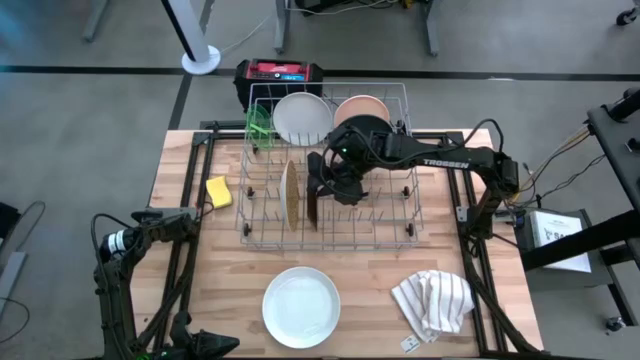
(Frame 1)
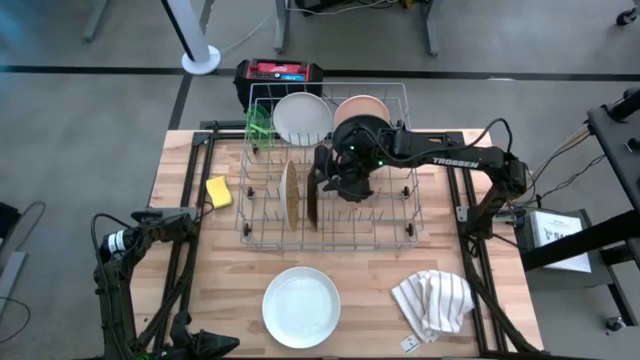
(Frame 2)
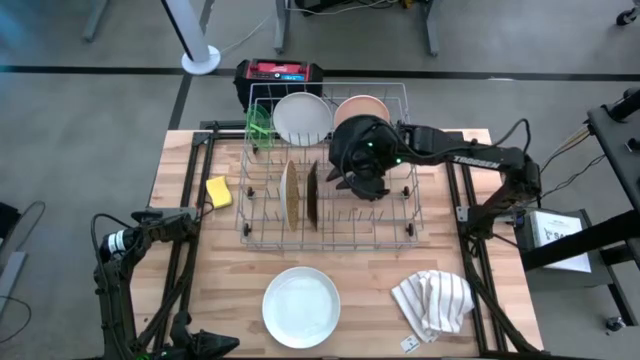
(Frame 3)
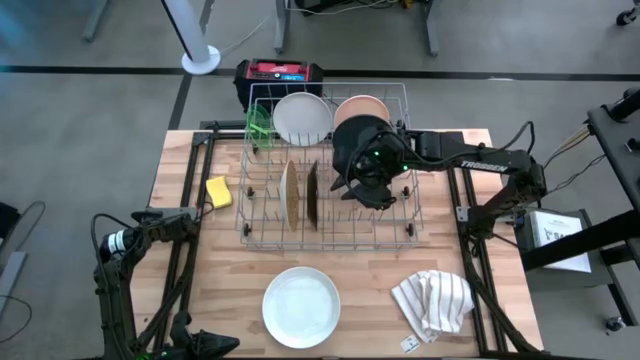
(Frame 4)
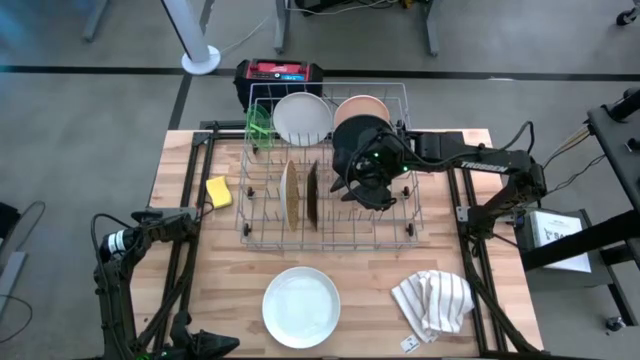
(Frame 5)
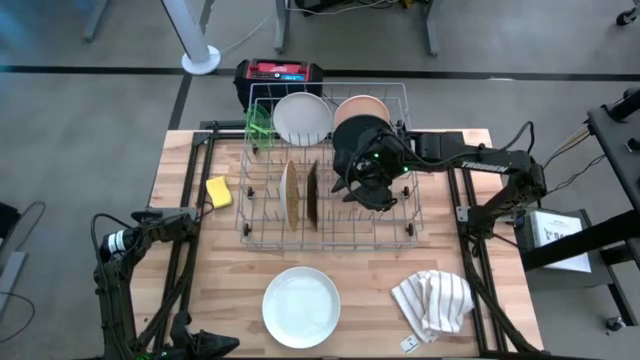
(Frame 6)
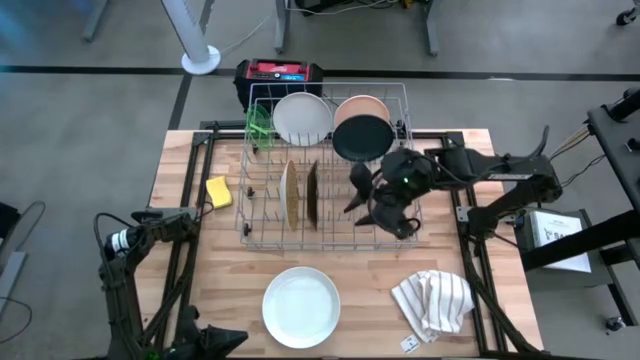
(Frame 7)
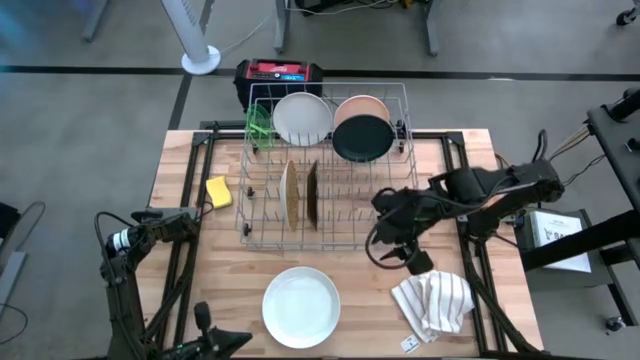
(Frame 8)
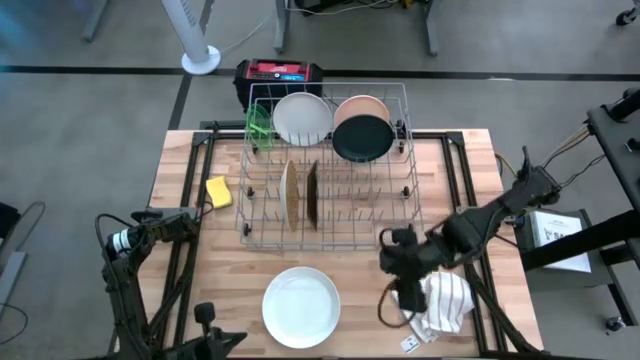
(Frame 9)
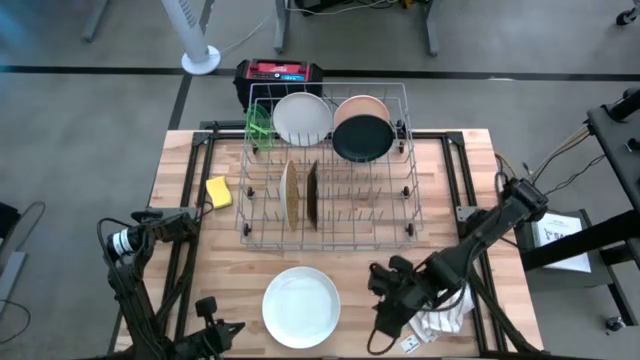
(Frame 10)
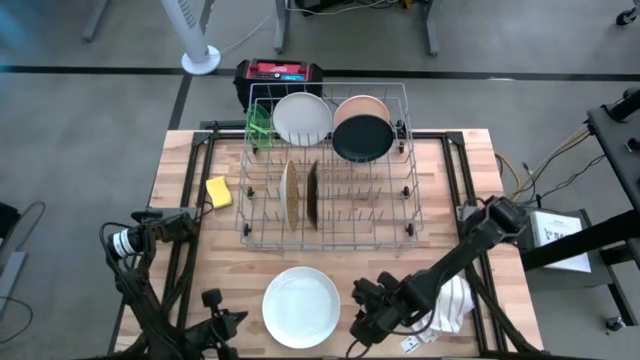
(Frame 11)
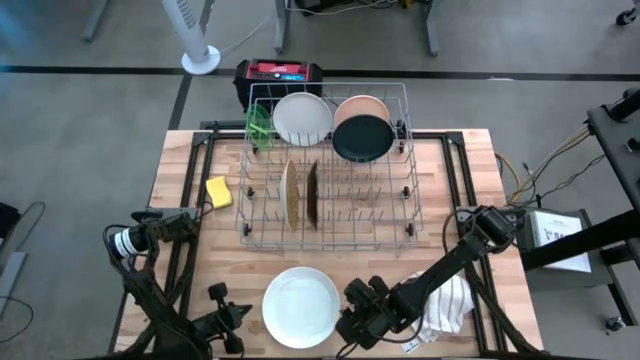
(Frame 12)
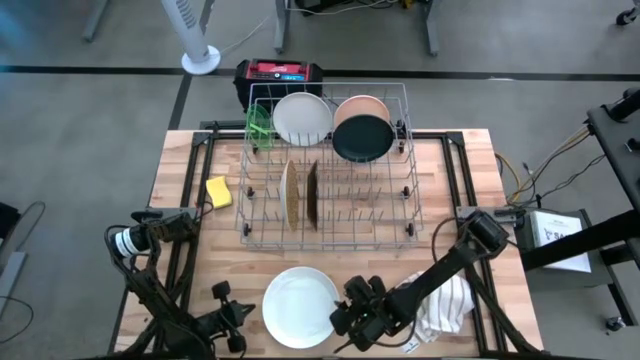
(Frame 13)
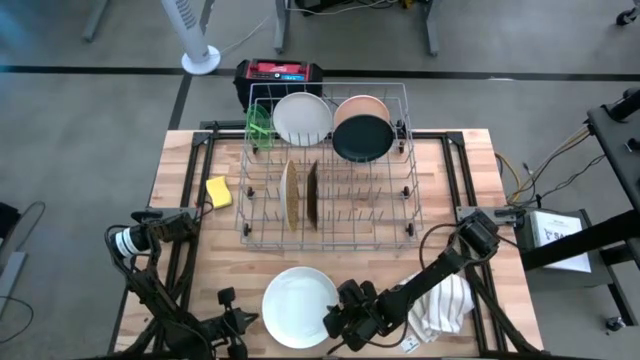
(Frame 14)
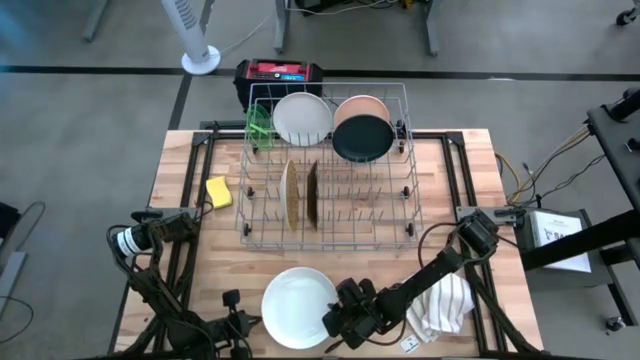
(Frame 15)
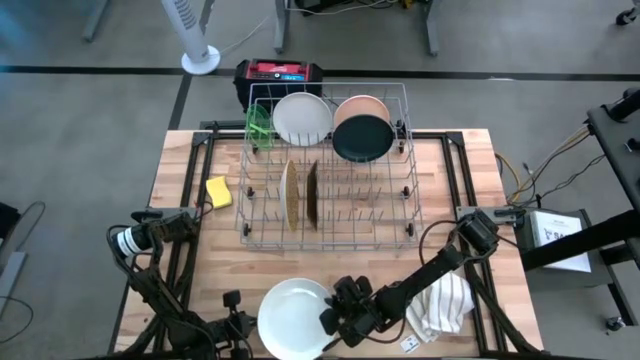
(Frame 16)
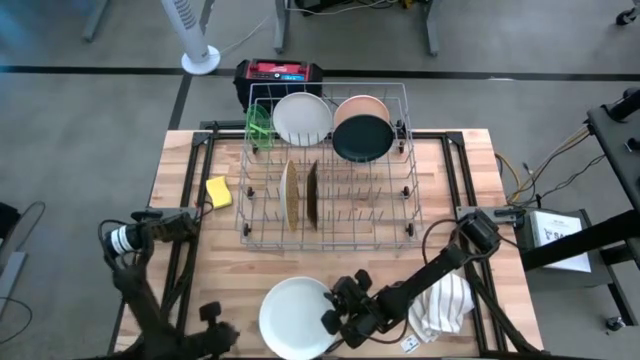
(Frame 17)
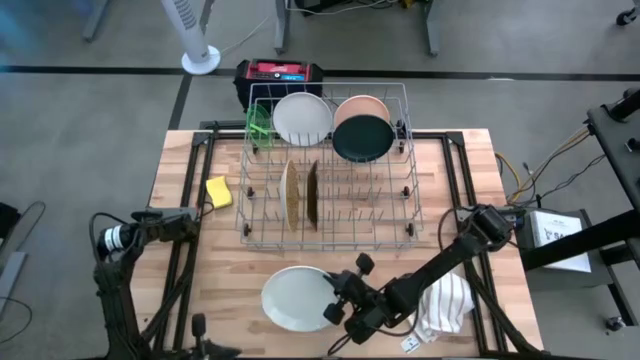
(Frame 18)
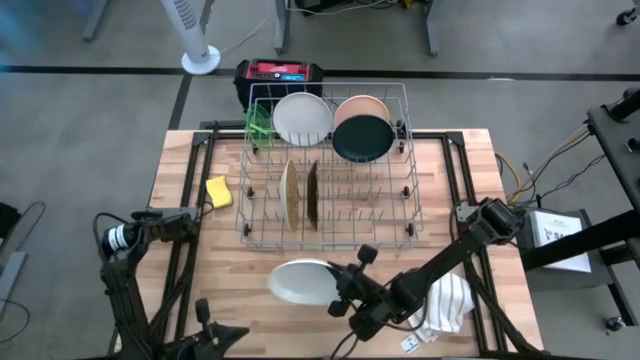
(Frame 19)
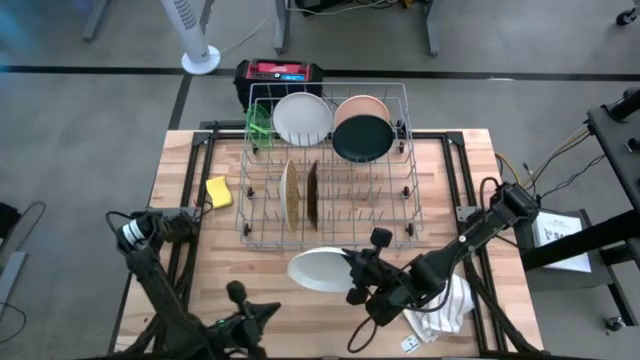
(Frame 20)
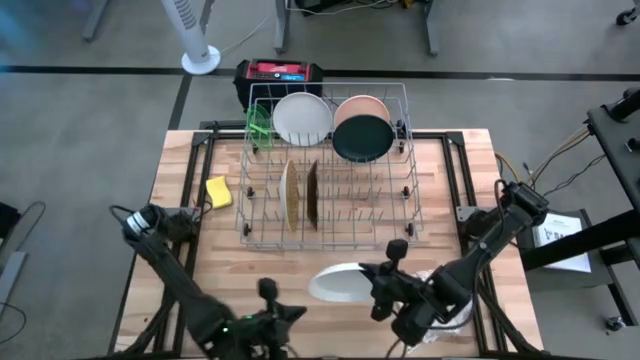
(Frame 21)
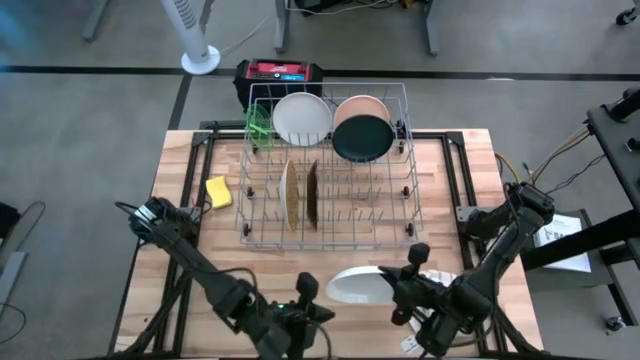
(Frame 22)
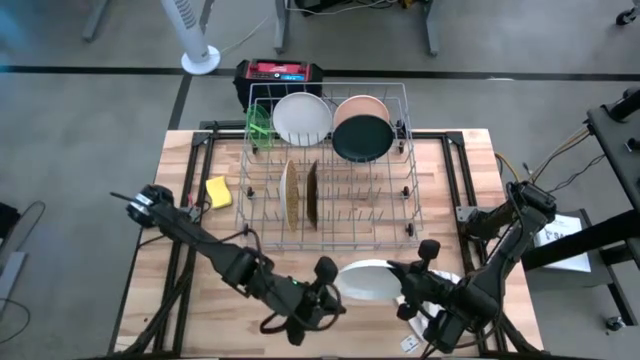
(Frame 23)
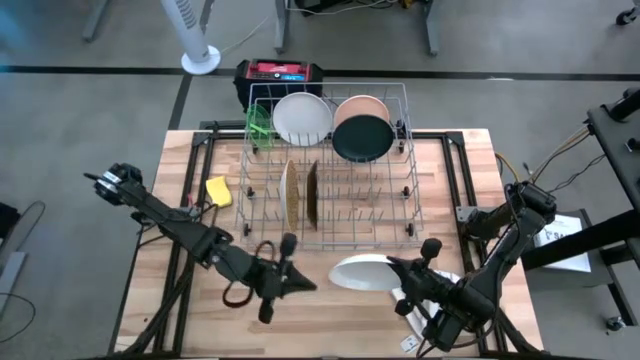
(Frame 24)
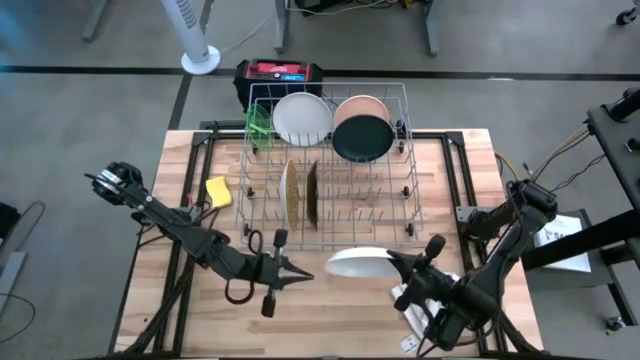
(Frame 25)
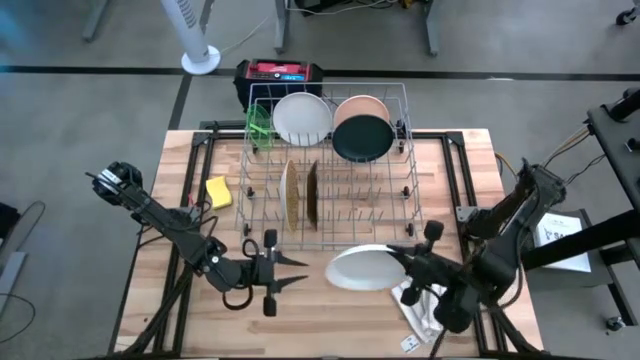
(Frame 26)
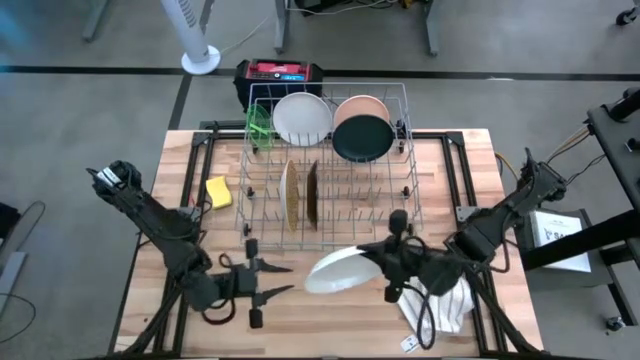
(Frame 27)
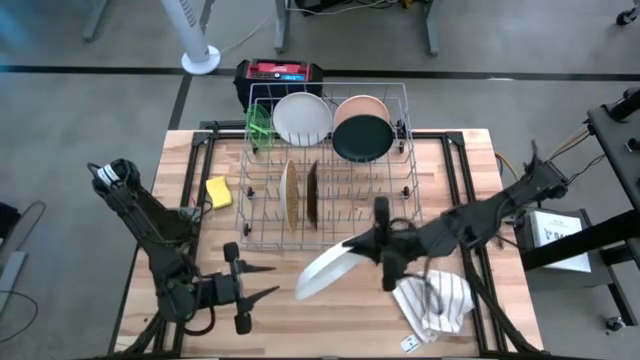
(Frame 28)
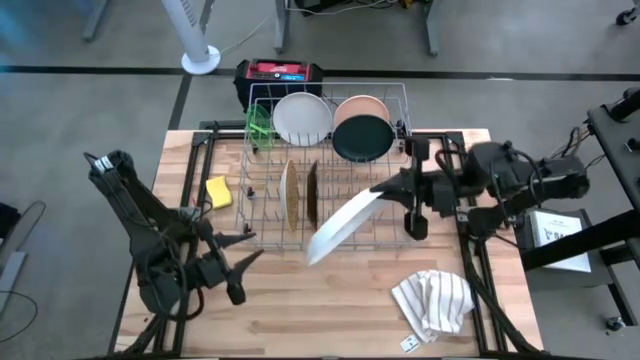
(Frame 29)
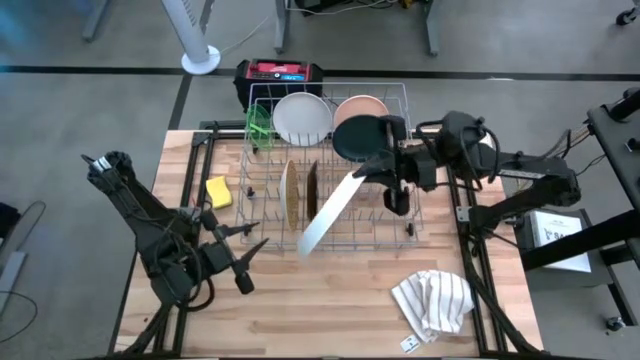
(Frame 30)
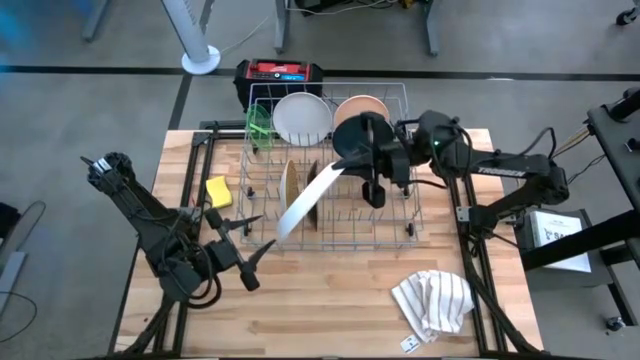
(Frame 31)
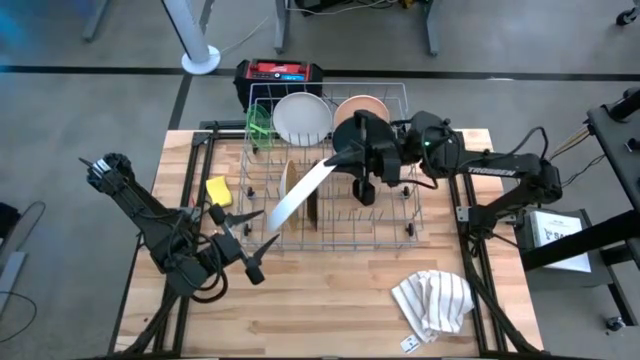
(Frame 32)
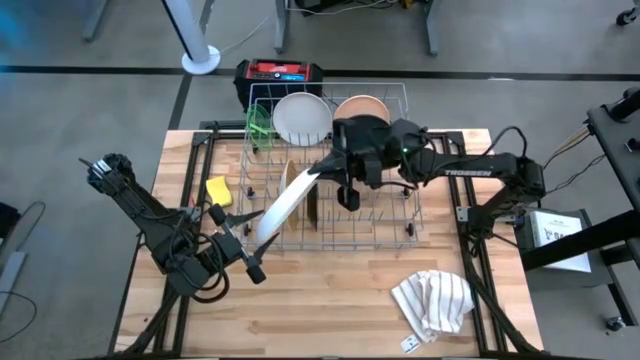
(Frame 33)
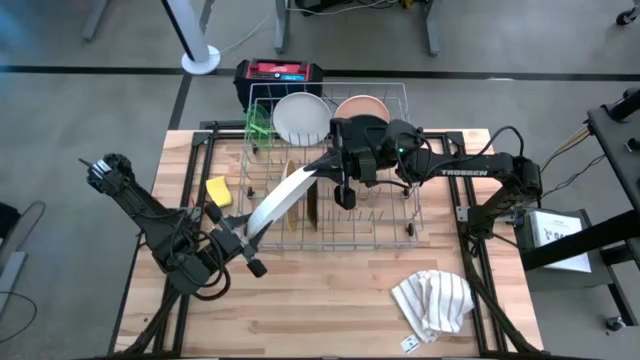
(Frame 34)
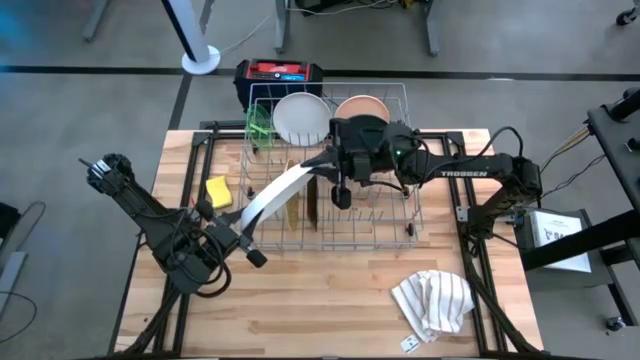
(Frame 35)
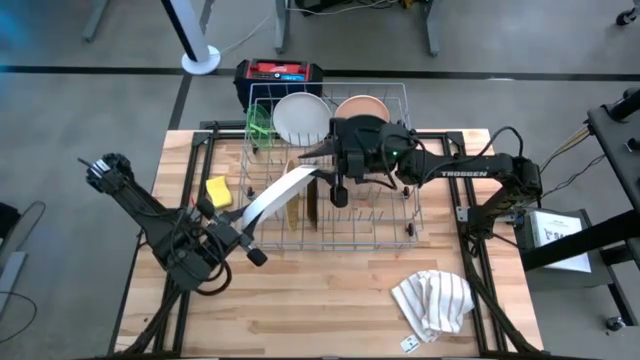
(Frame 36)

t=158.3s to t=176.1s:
Task: Sort dishes
Put the white plate into the dish rack

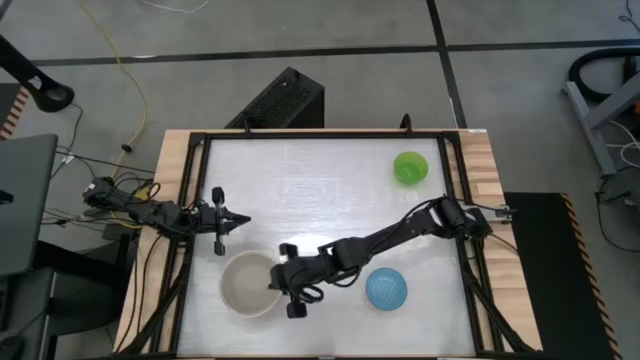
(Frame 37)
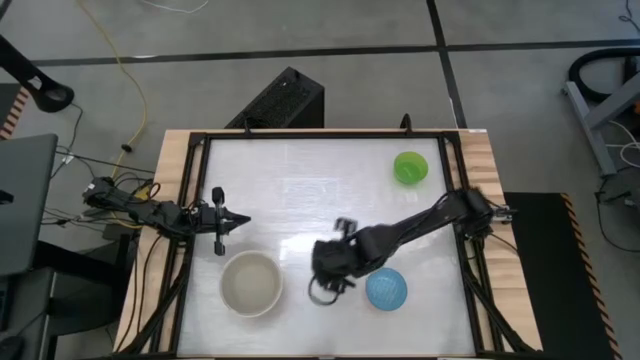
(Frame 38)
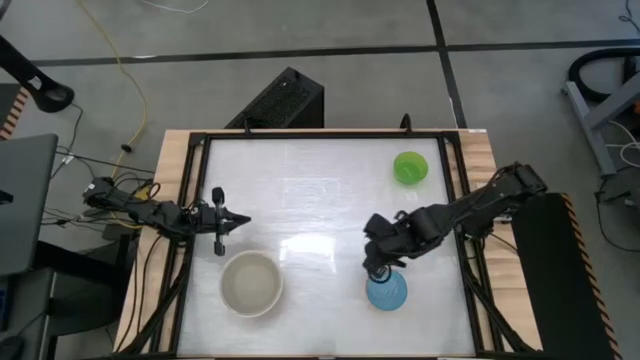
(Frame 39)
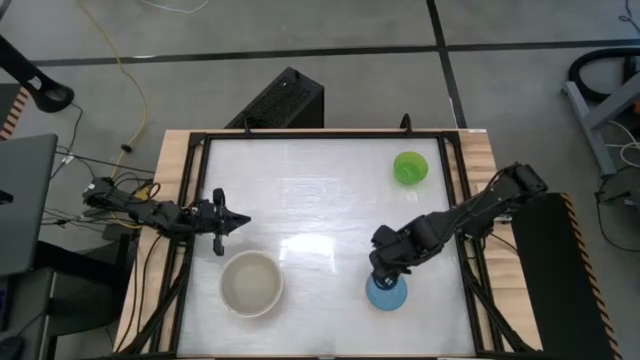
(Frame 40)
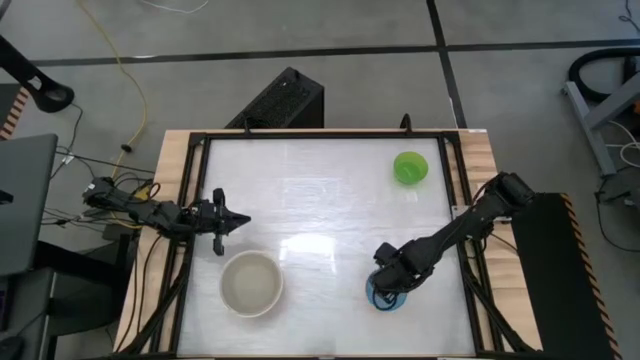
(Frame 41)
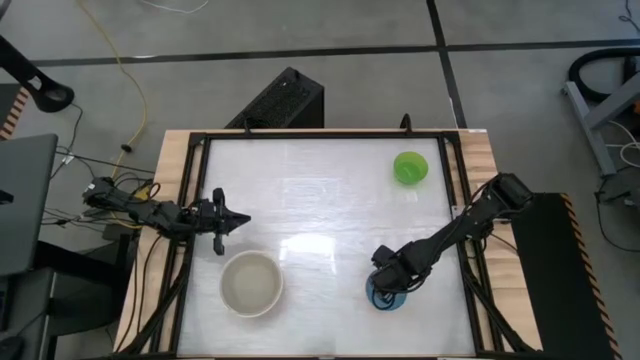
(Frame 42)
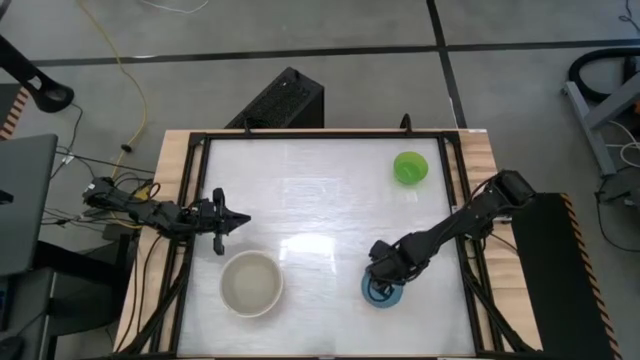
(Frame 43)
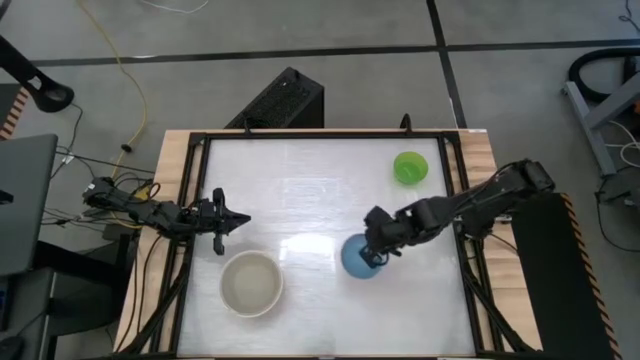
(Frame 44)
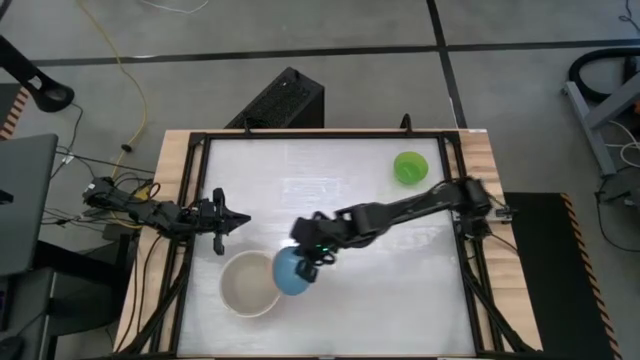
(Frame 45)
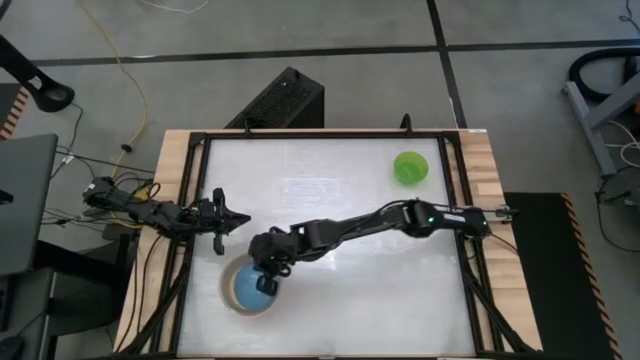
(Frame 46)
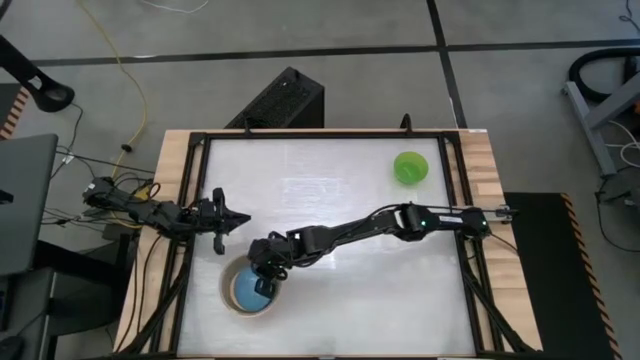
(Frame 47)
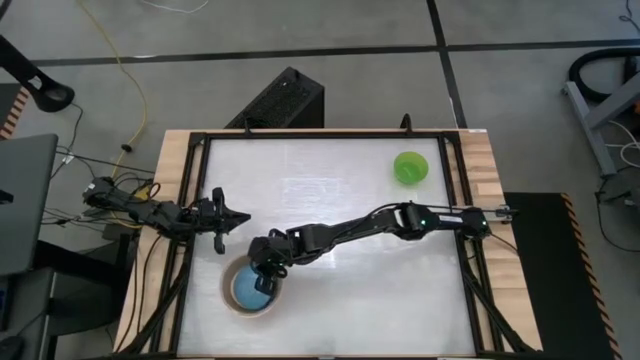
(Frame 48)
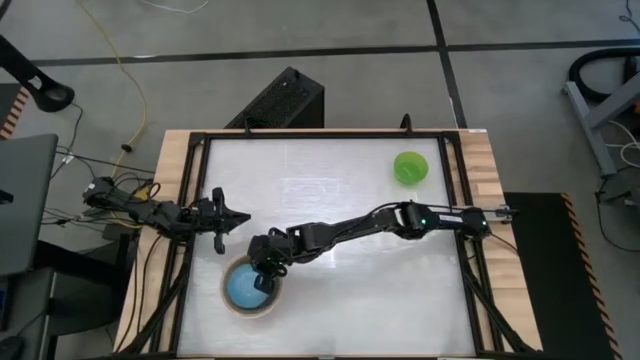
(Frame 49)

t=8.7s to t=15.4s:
Task: Nest bowls inside each other by size order
Stack the blue bowl on top of the gray bowl
